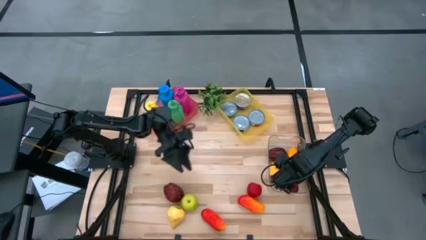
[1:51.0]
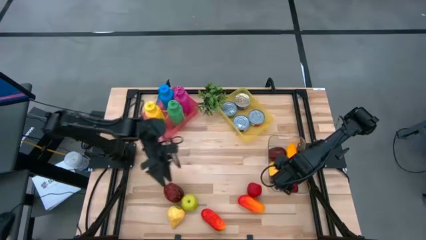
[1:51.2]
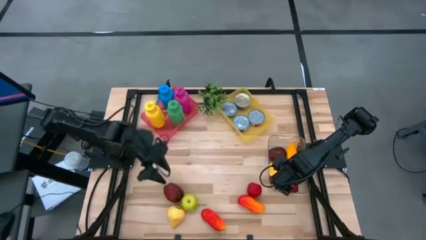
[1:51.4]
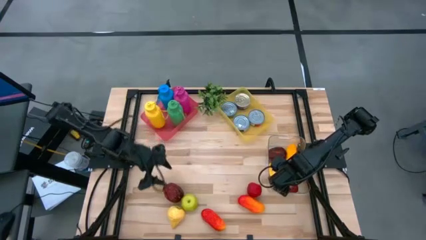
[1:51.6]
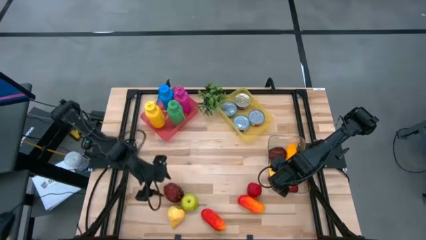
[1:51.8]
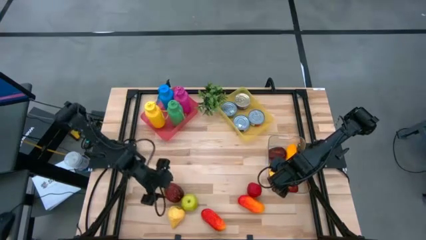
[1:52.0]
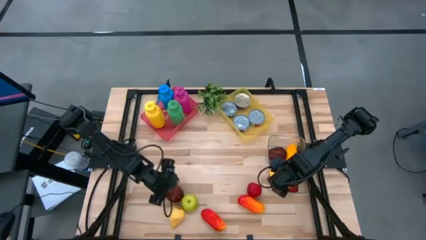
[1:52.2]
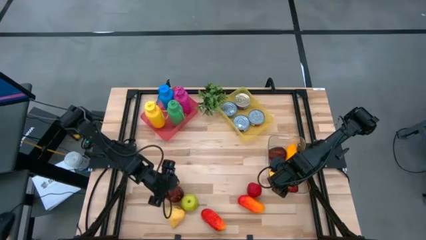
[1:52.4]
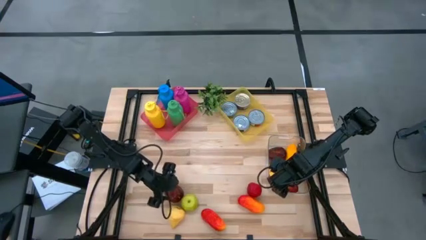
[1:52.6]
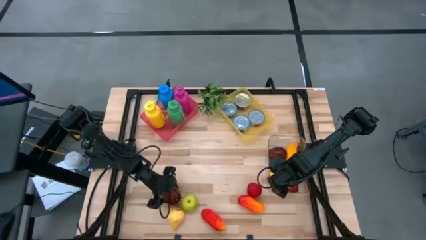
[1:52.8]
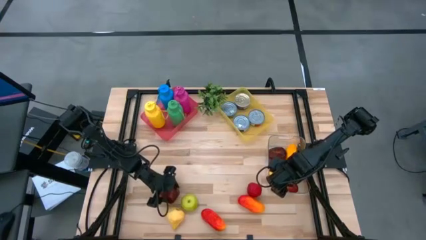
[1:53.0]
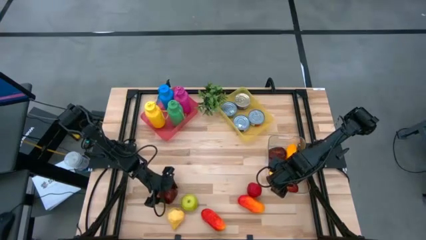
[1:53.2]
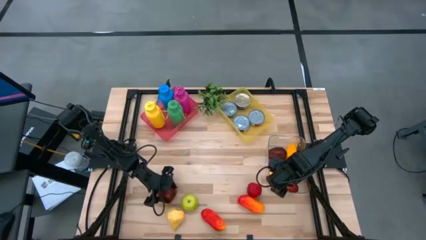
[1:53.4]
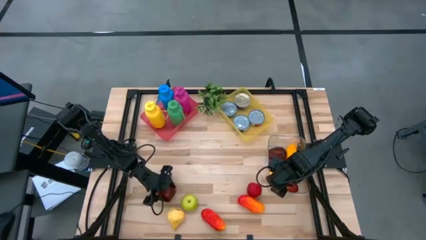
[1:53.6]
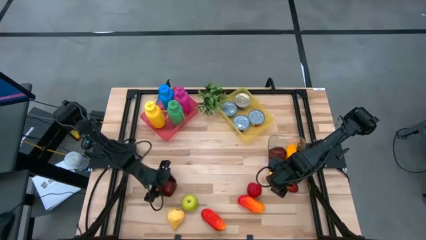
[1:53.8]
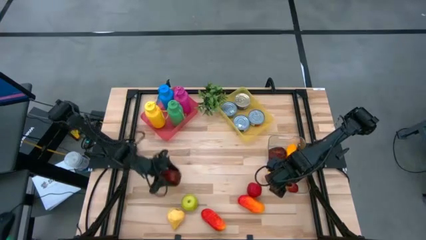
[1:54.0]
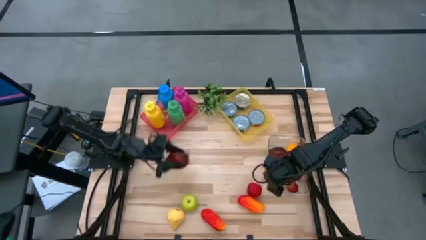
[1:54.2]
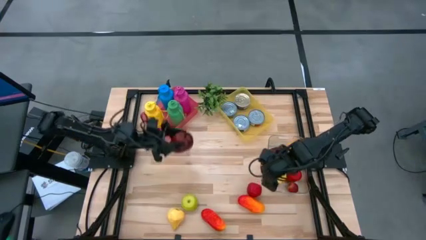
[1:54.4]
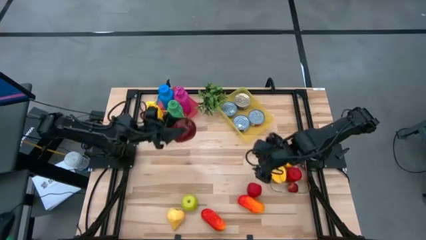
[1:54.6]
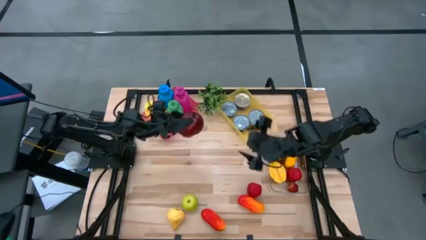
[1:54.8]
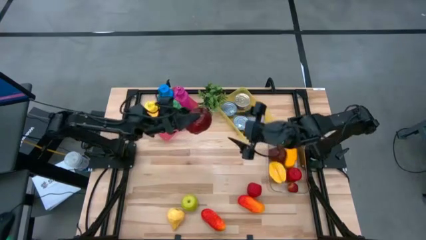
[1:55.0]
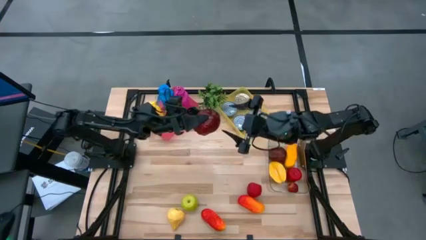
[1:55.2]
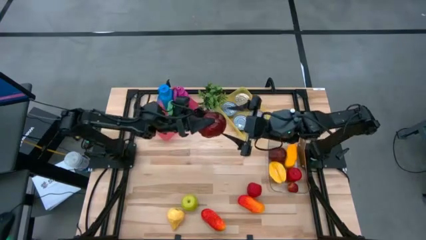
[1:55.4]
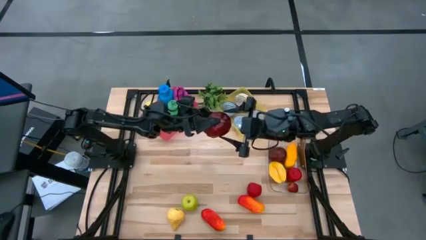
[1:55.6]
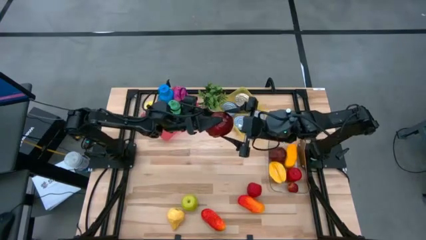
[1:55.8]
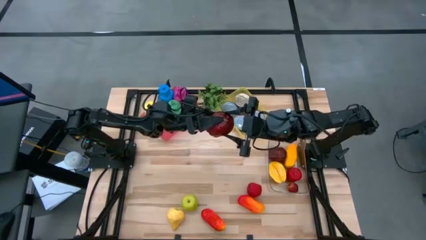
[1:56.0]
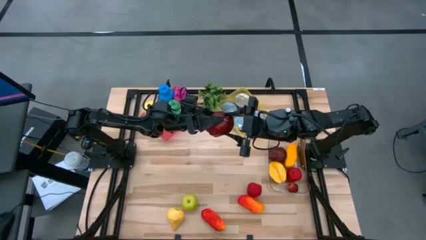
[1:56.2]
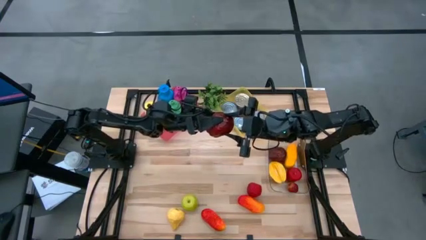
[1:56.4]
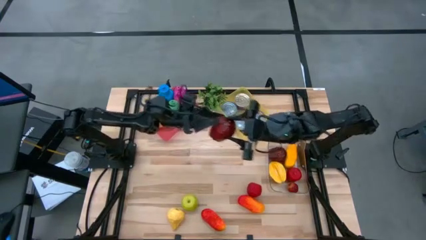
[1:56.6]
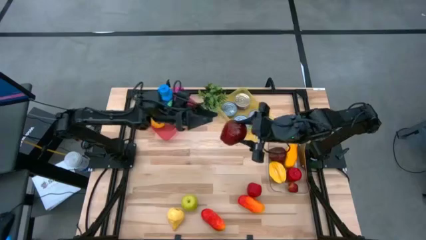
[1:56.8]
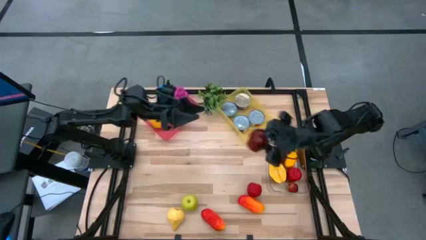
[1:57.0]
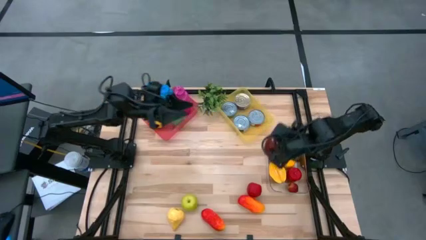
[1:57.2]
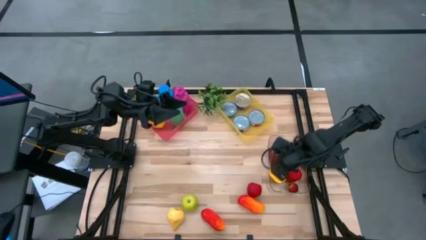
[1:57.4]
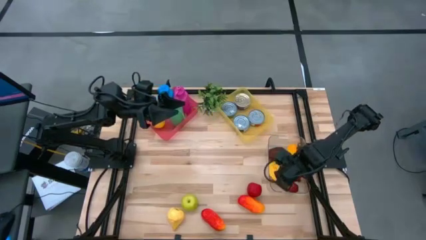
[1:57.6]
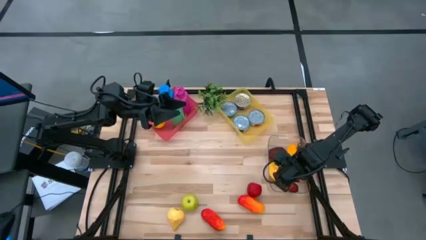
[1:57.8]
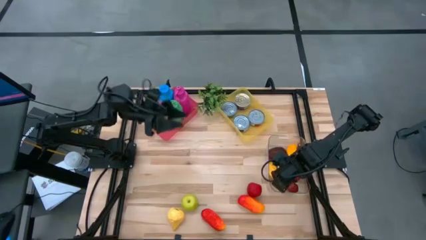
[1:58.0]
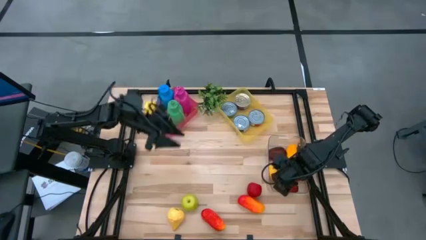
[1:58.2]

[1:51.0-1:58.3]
Task: Pick & Place Food Item
Put the dark red apple into the transparent bin

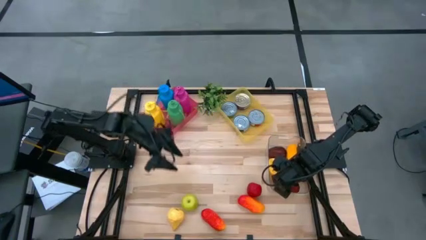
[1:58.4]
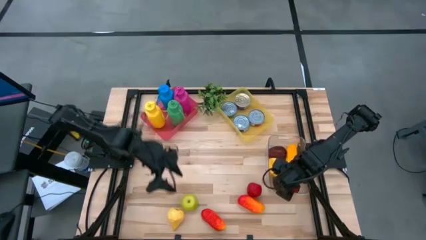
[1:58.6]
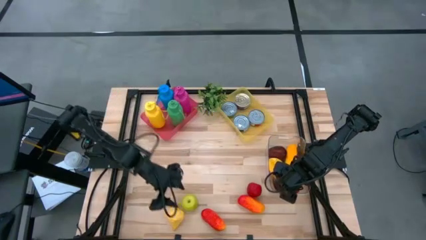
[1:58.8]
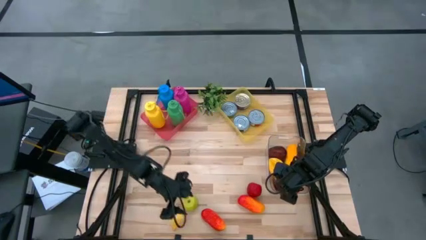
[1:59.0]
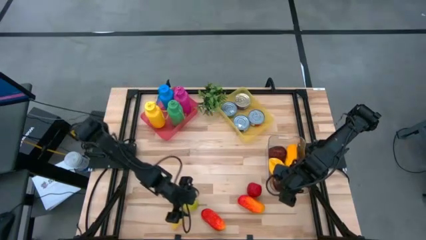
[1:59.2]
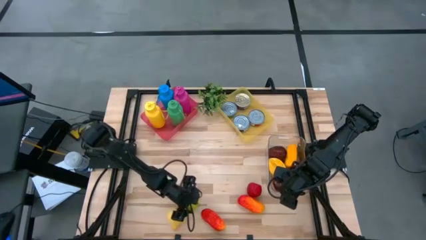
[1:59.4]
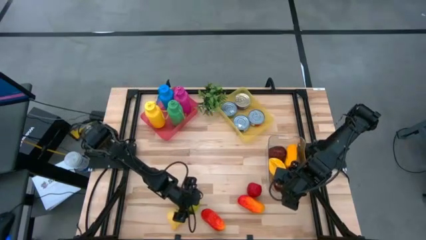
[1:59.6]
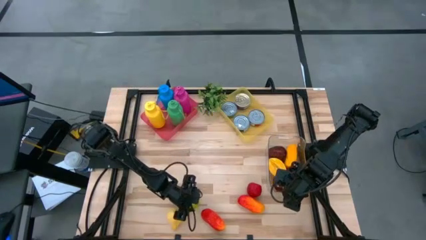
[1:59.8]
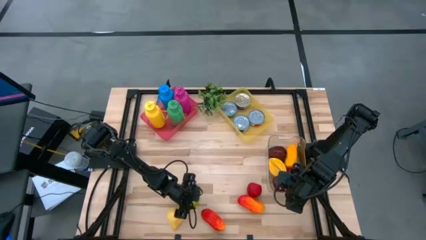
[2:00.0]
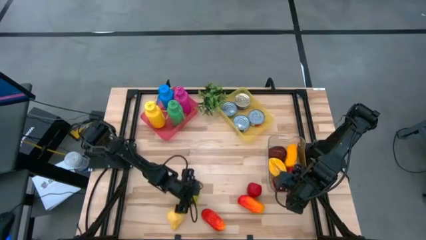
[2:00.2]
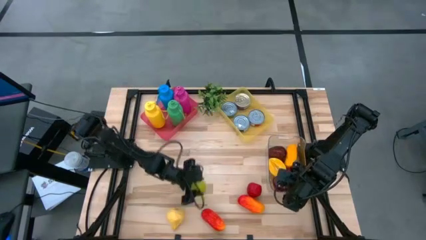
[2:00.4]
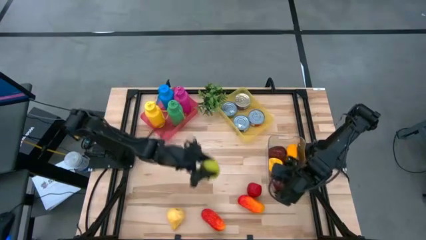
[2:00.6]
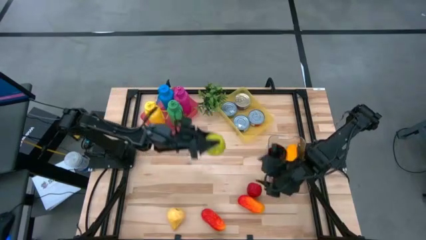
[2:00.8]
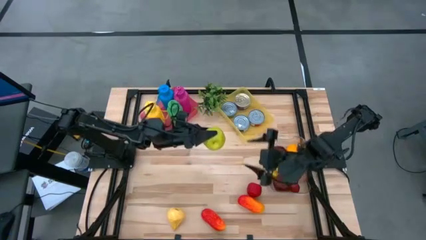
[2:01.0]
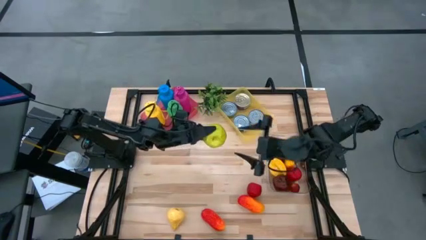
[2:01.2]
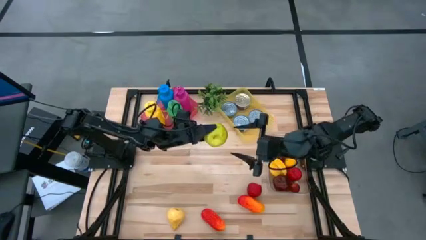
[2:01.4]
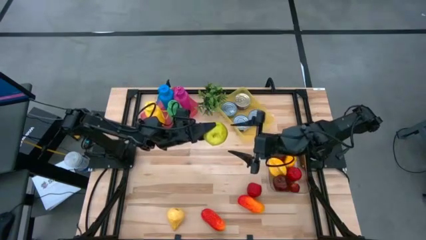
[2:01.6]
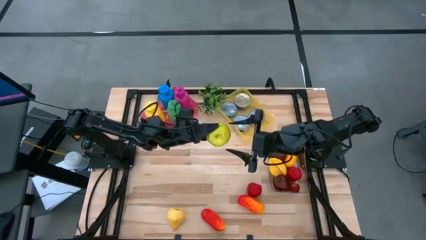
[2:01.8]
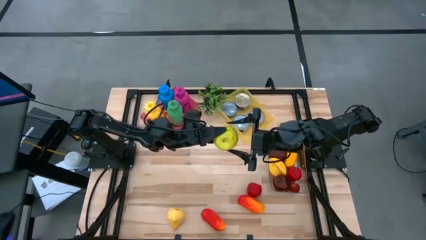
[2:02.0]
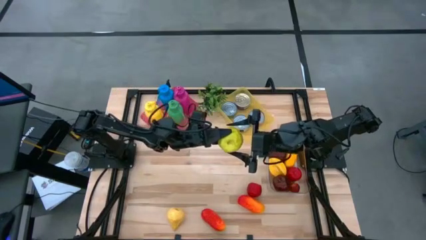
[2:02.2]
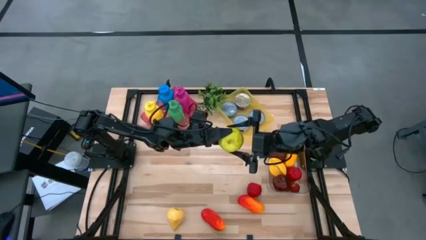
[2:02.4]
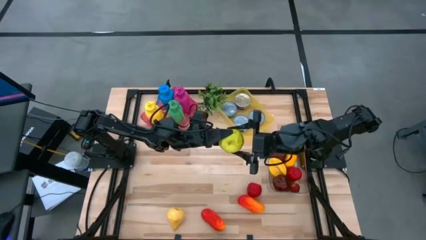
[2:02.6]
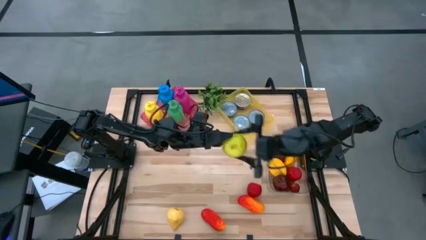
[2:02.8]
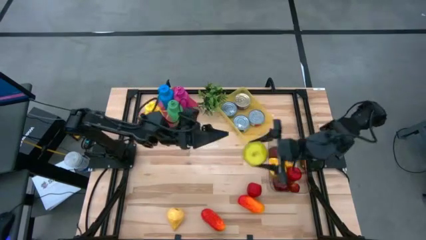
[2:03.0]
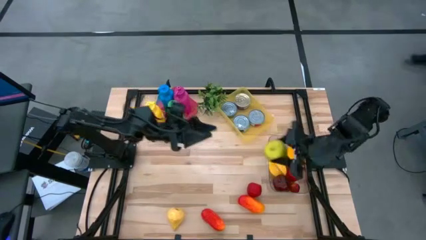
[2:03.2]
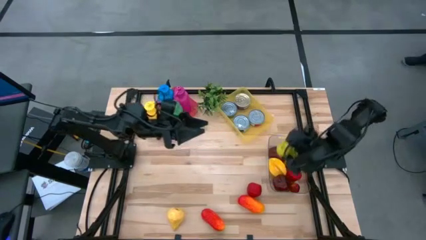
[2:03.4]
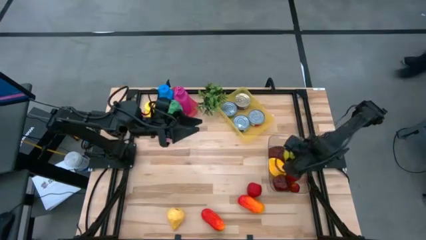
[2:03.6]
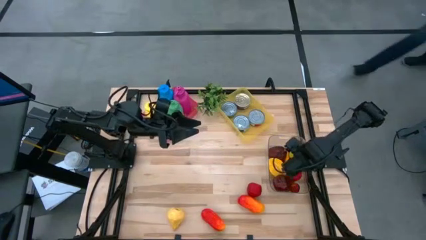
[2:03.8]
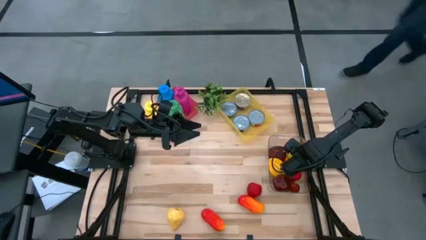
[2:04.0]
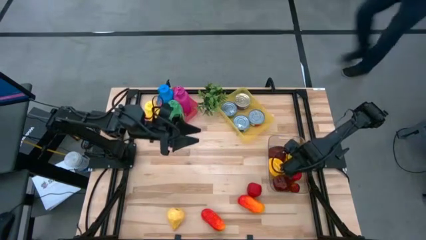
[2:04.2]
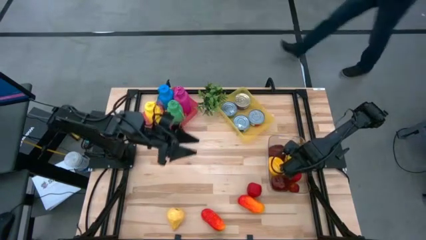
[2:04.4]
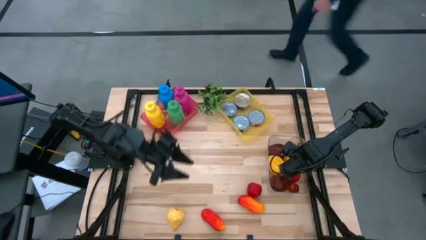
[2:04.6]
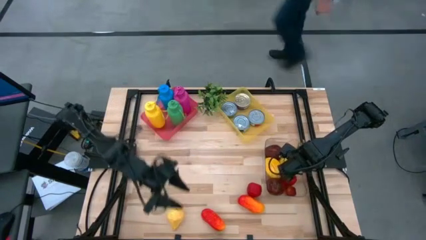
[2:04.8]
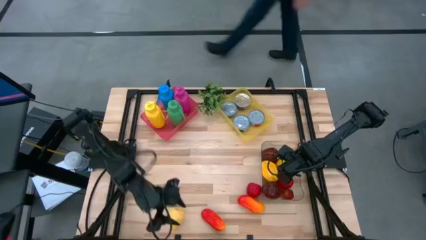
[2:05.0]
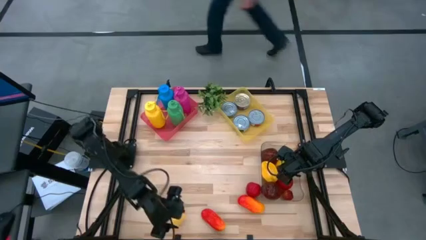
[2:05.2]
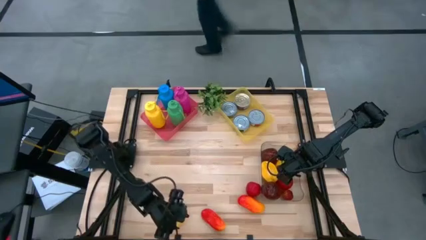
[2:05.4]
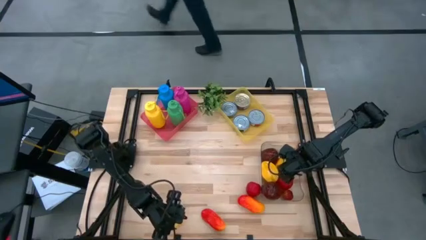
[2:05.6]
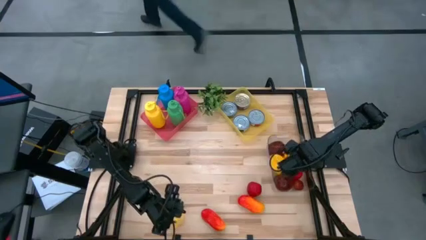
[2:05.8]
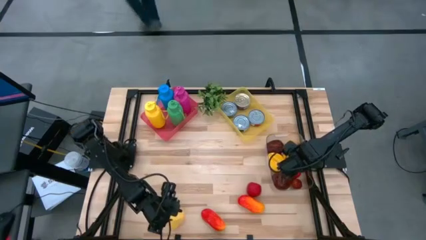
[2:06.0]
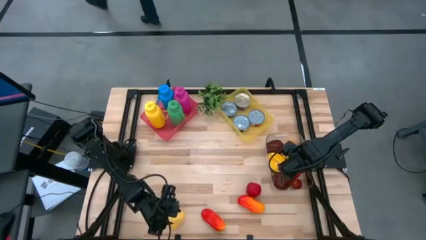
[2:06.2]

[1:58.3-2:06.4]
Put the green apple into the transparent bin

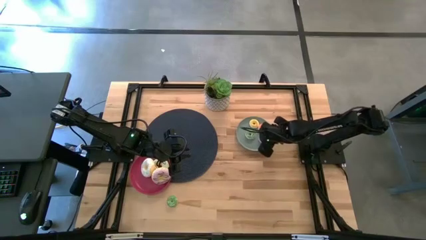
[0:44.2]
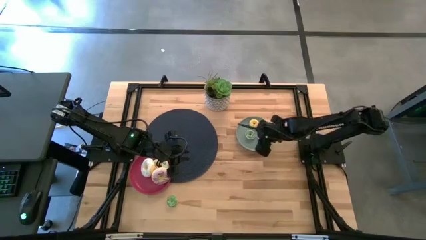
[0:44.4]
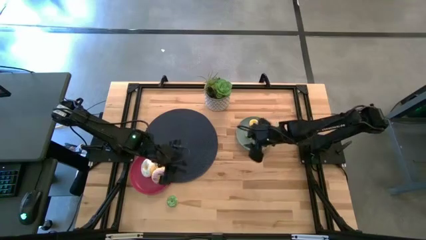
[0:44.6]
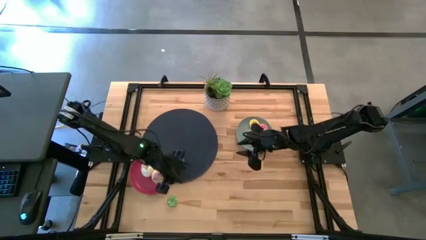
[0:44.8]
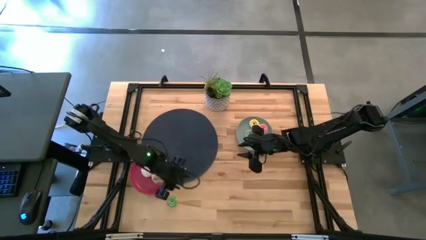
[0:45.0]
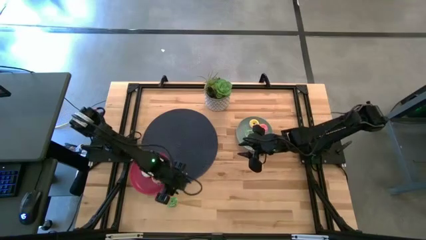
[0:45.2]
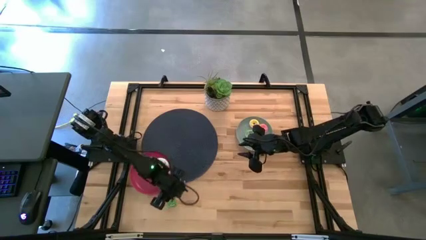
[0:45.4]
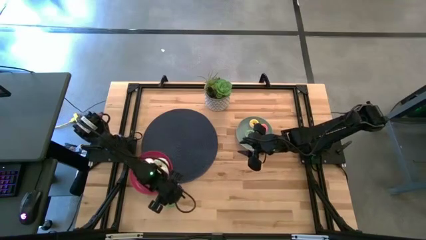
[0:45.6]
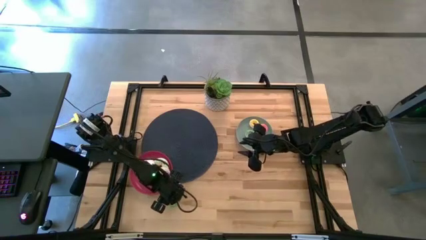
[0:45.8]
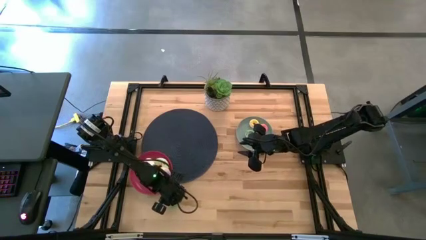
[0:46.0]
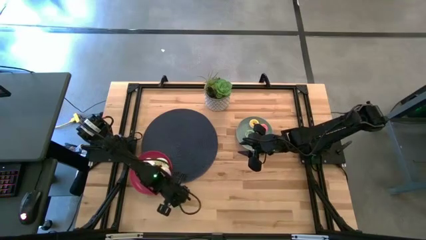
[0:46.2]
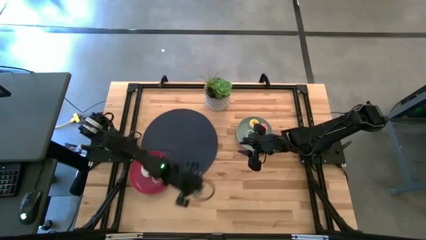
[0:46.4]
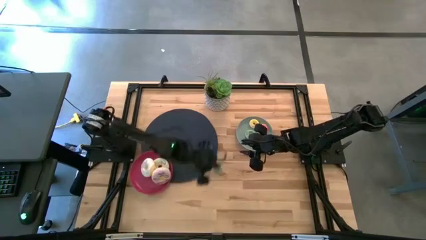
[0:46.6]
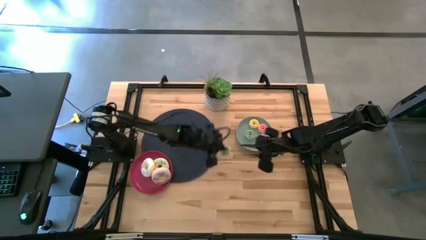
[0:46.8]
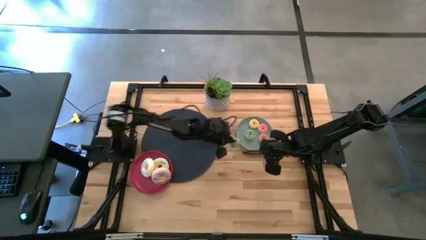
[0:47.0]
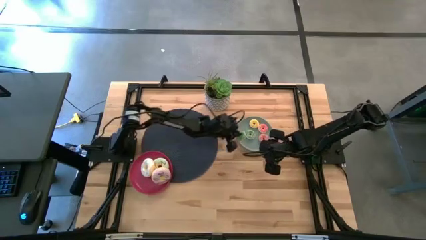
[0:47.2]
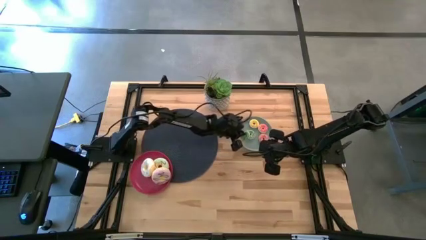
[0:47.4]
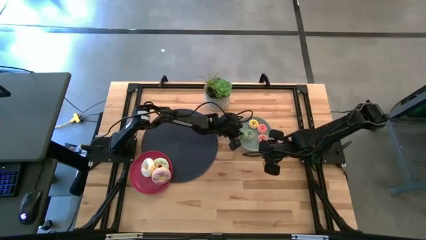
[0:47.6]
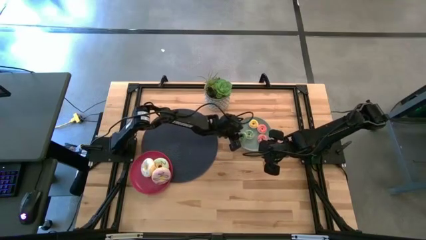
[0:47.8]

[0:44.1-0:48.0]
Task: Pick & Place donuts
Put the small green donut on the blue plate
